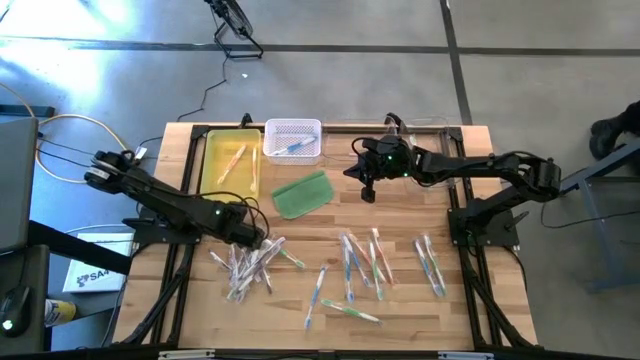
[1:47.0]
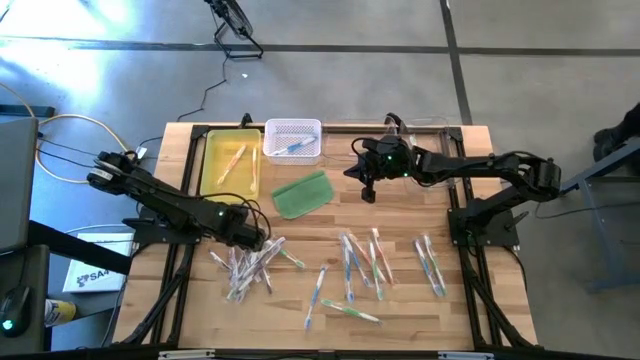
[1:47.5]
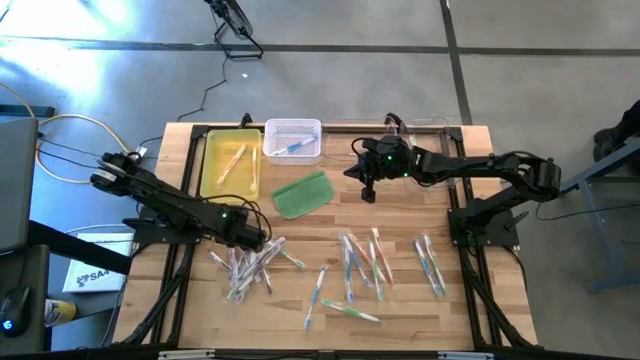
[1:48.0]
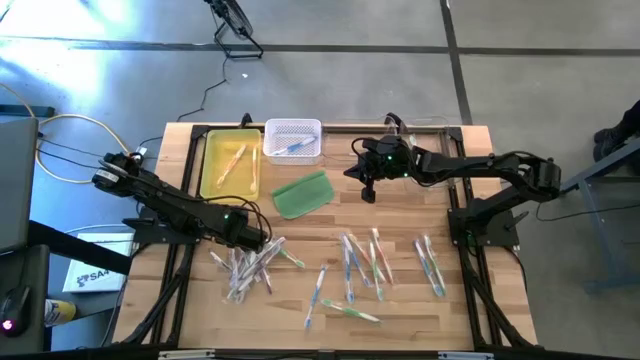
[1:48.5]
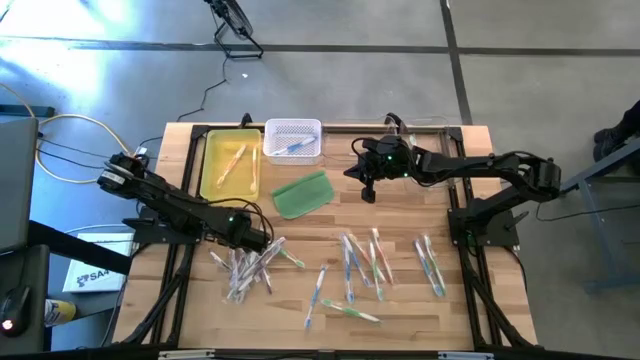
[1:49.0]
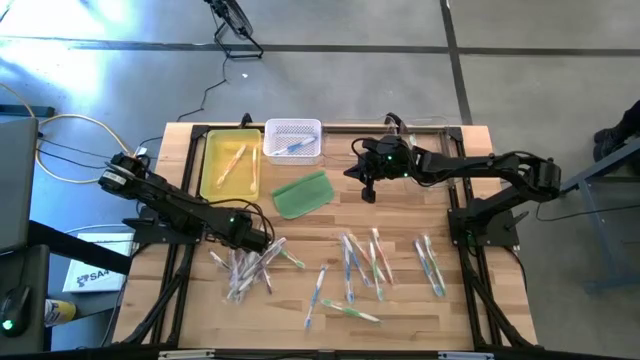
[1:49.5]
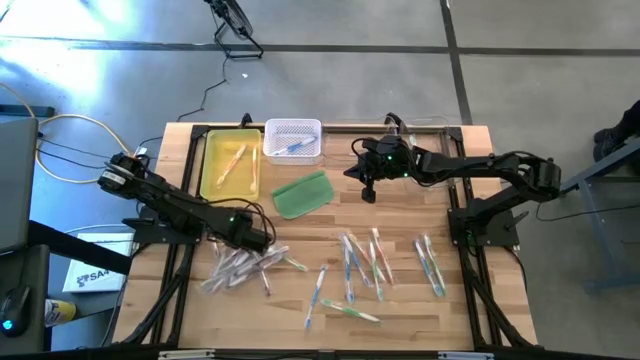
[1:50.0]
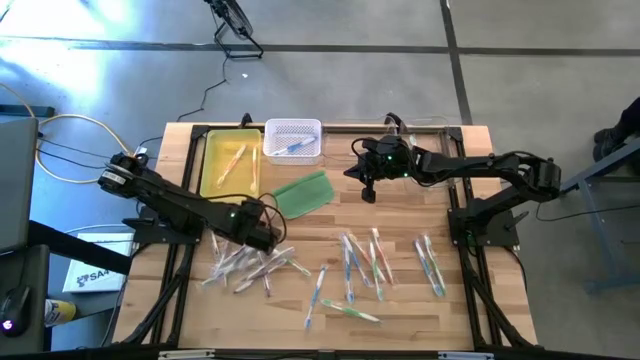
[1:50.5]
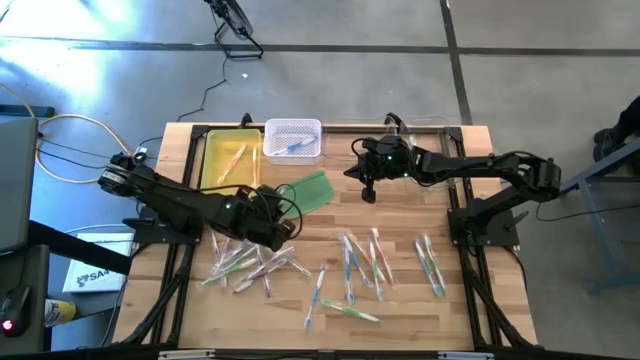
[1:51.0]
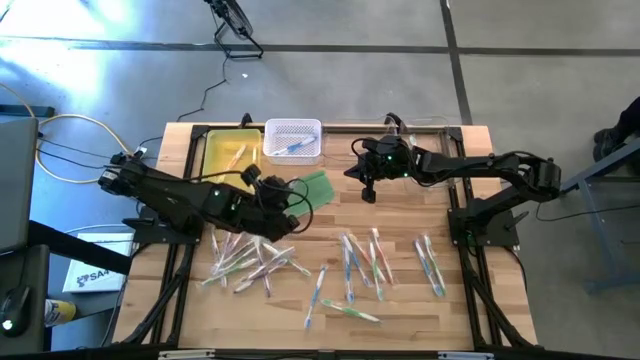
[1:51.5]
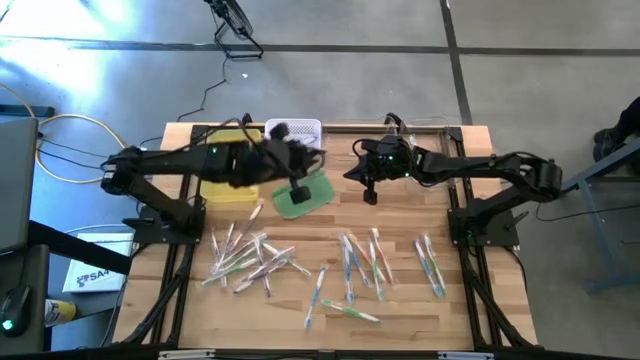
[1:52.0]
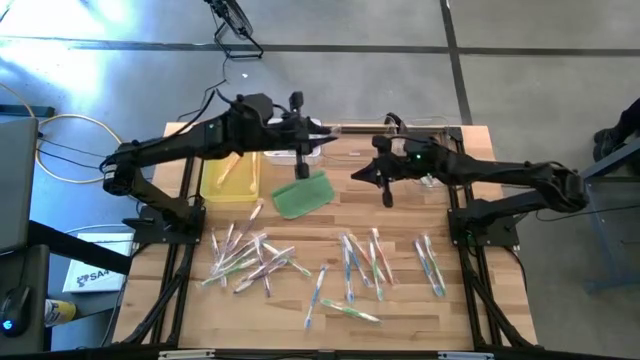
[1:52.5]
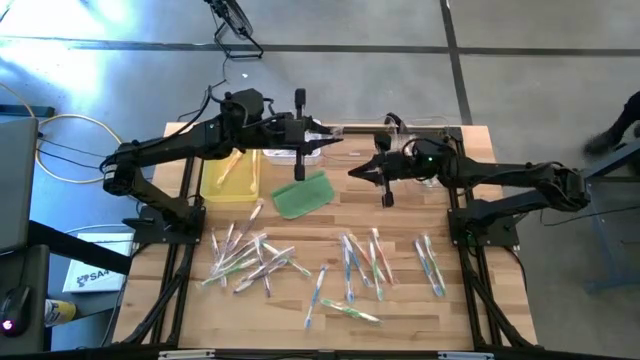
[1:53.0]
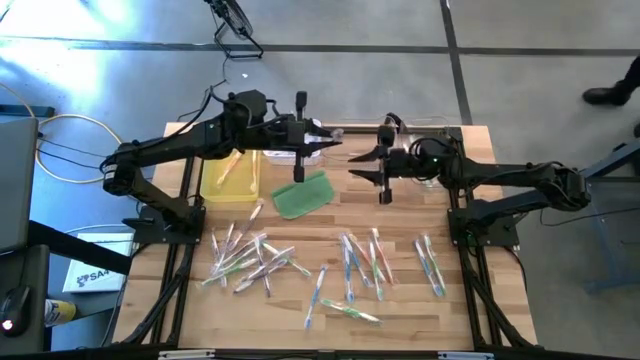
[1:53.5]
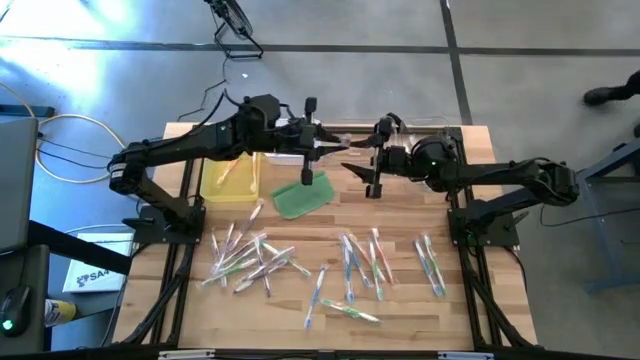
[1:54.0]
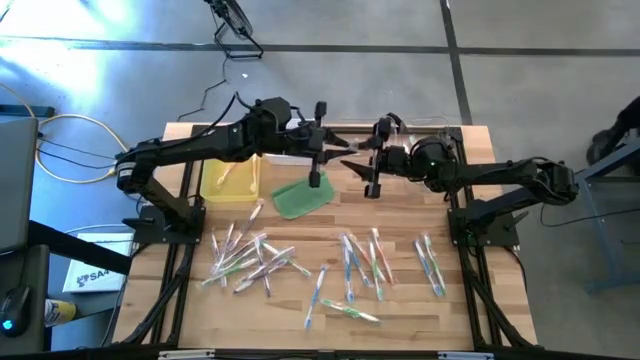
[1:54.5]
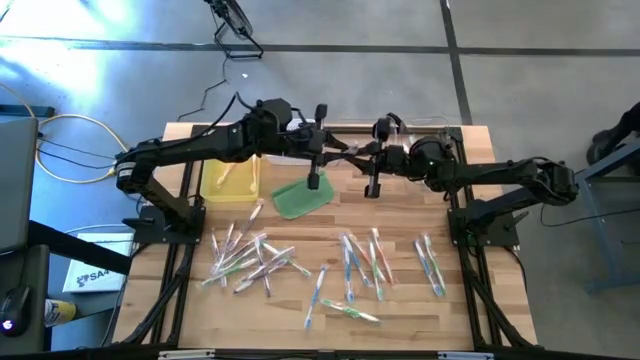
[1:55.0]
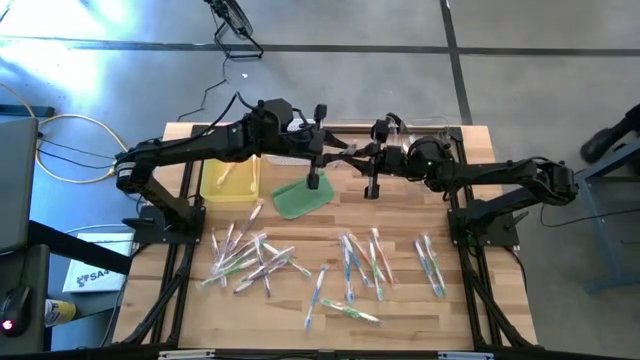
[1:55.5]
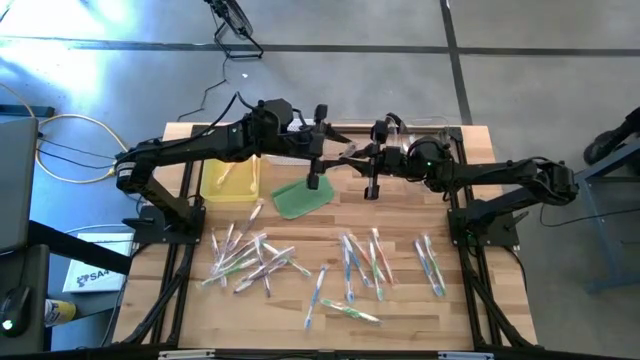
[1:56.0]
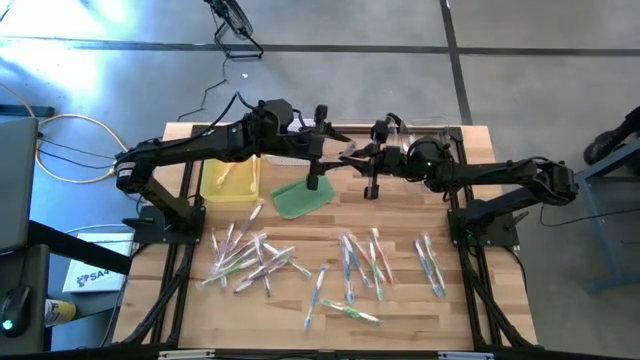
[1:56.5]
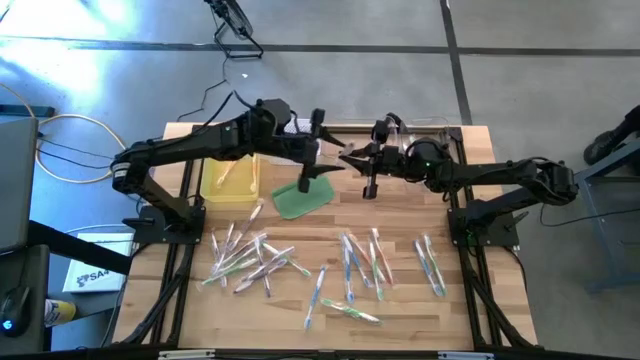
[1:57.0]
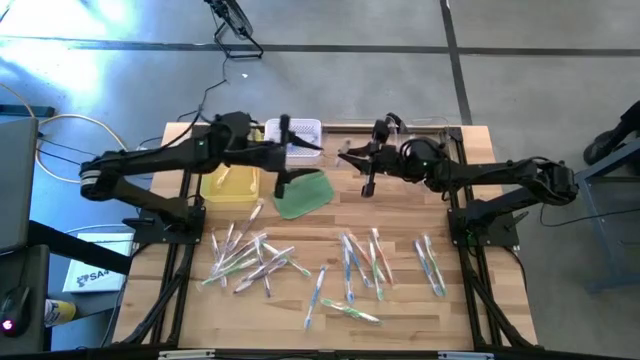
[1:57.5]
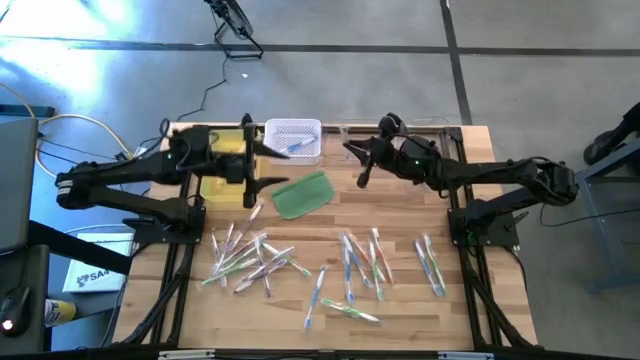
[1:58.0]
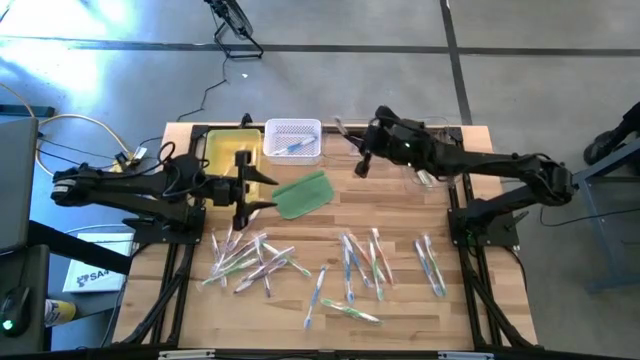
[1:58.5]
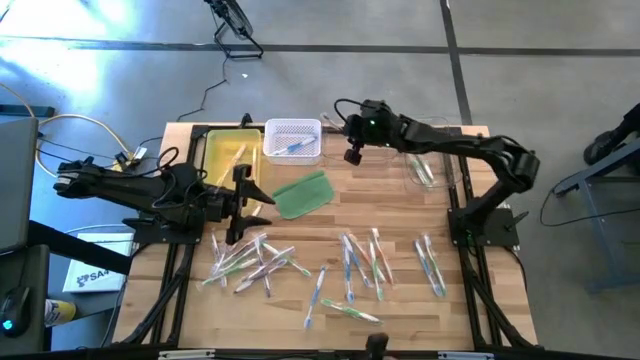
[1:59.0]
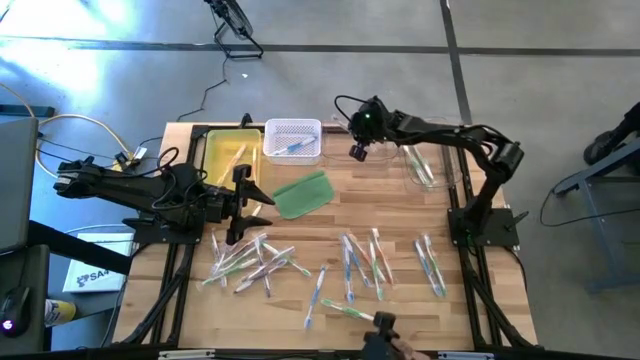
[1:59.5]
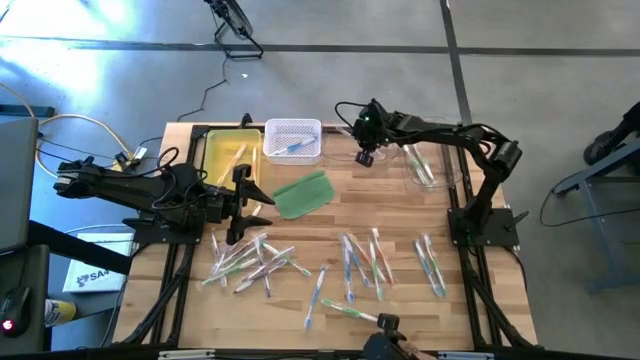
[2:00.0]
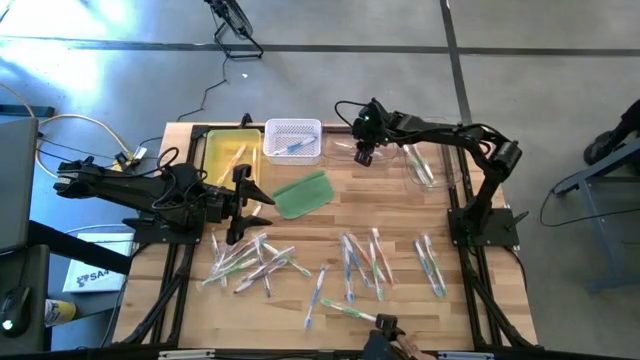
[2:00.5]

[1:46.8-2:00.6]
Task: Pick & Place Toothbrushes
Put the violet toothbrush into the left transparent bin

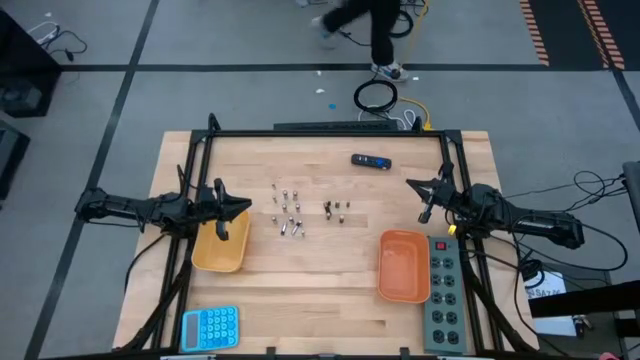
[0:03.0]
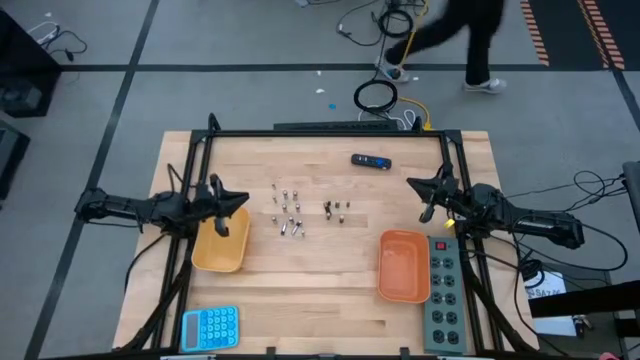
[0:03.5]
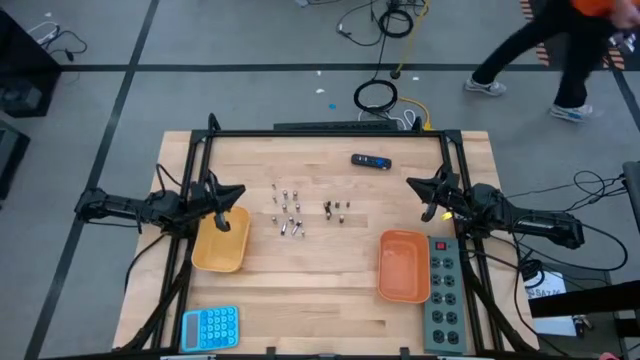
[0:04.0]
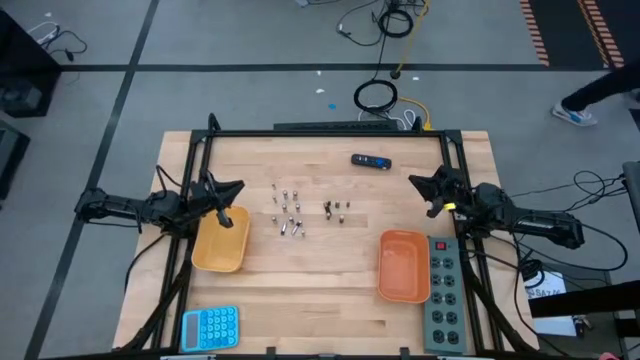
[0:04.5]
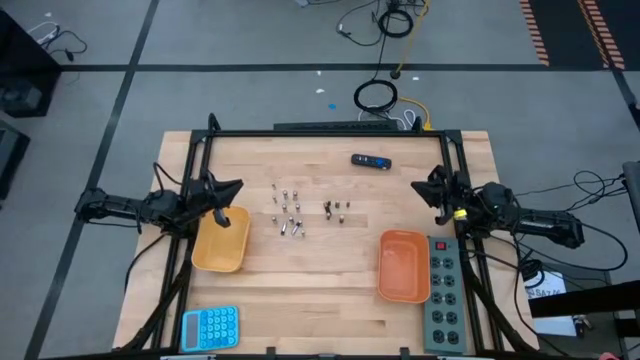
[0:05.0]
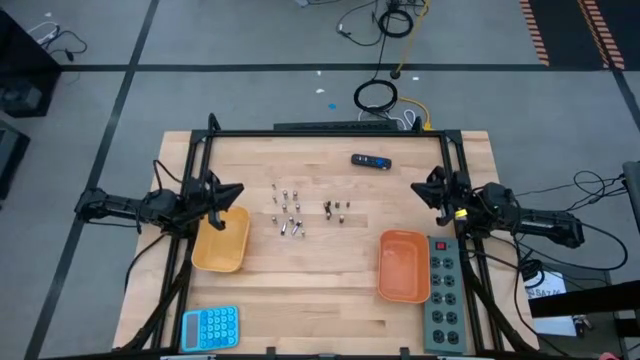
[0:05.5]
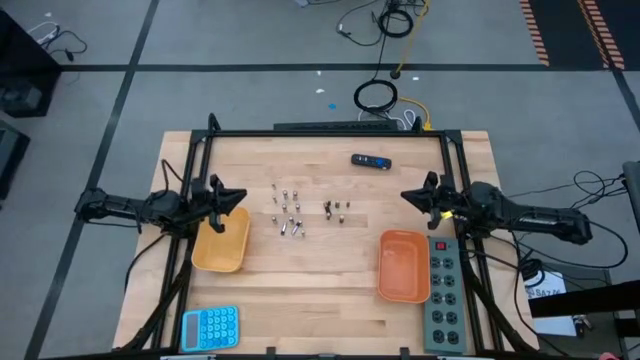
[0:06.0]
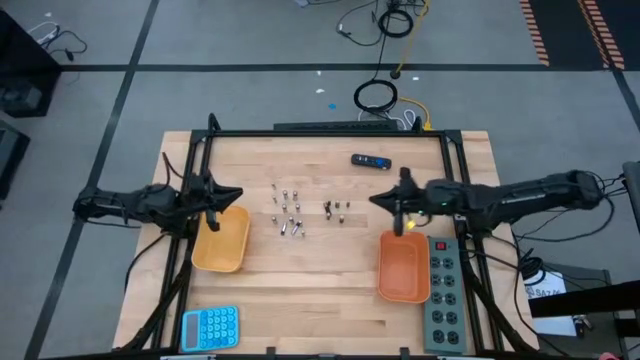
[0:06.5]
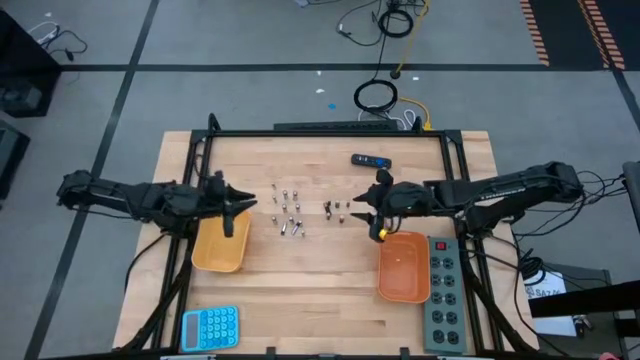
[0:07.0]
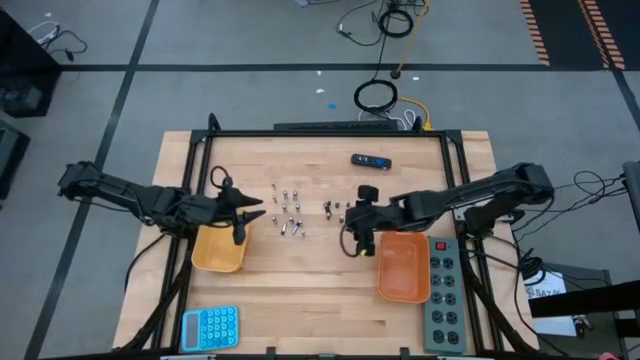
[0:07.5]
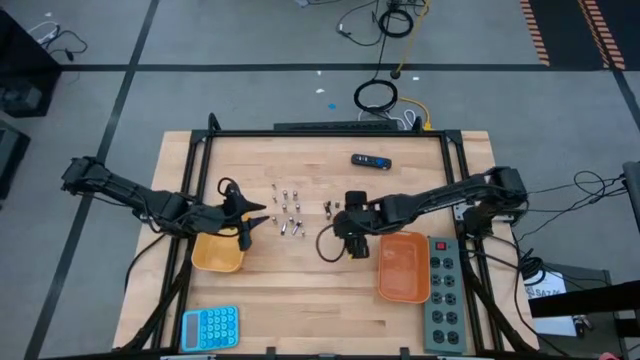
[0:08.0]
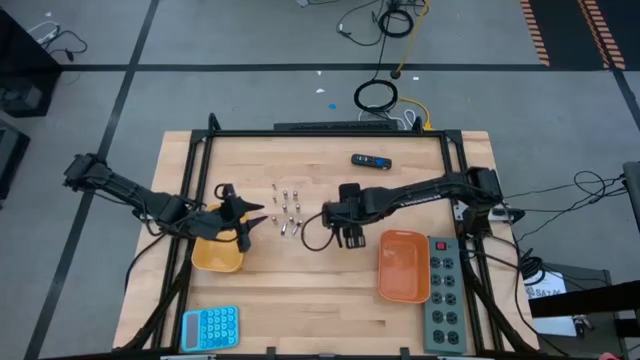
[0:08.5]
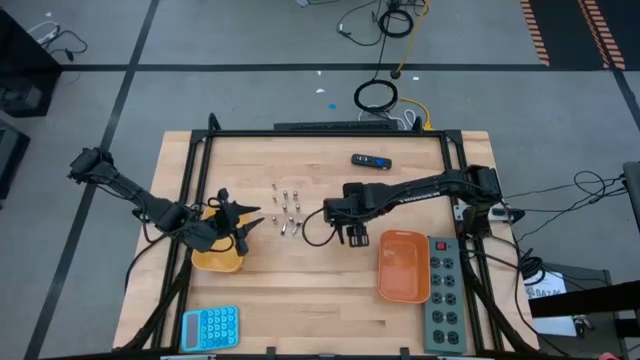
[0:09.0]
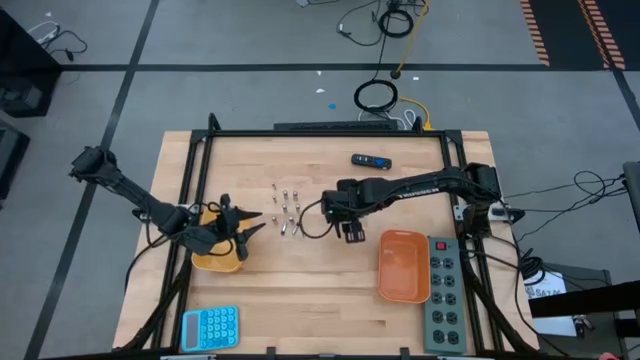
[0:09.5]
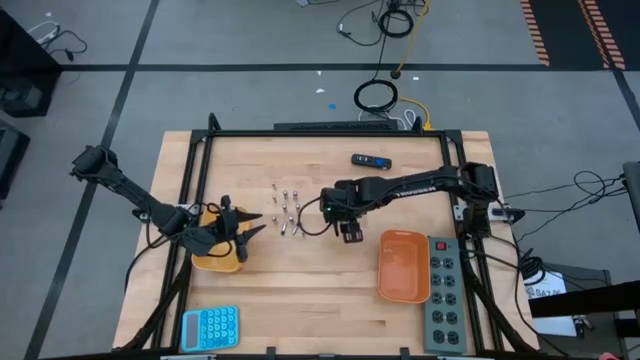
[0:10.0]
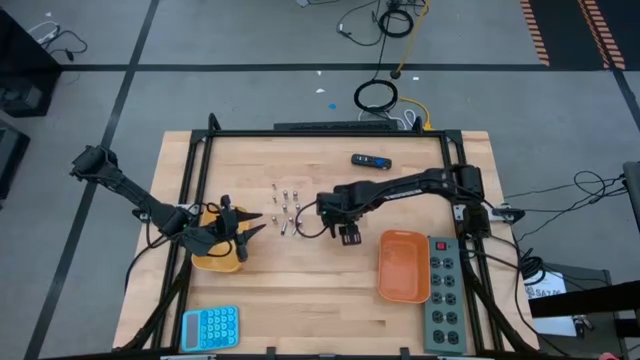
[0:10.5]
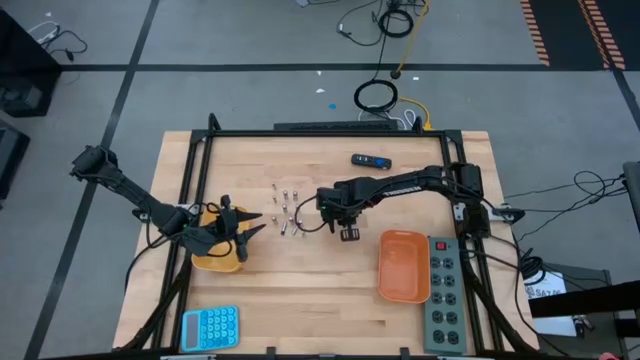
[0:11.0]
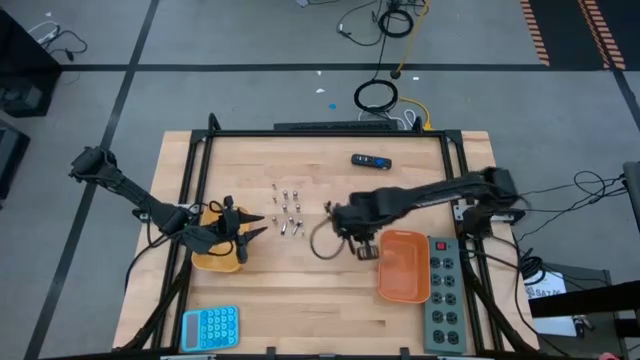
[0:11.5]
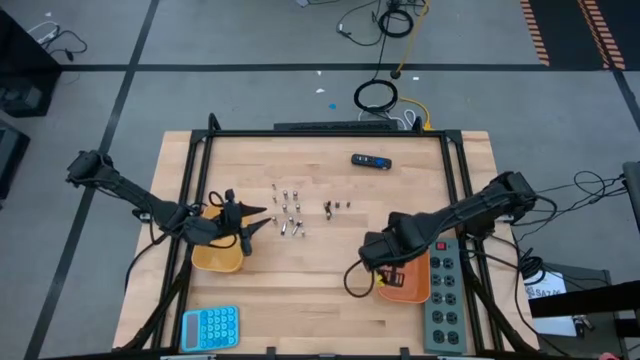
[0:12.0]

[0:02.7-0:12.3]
Task: Sort batteries
Put the black battery into the orange bin
